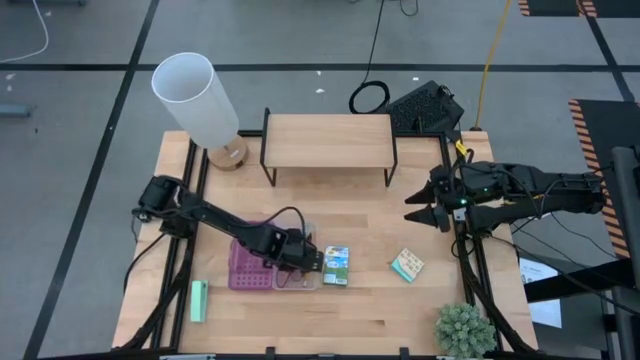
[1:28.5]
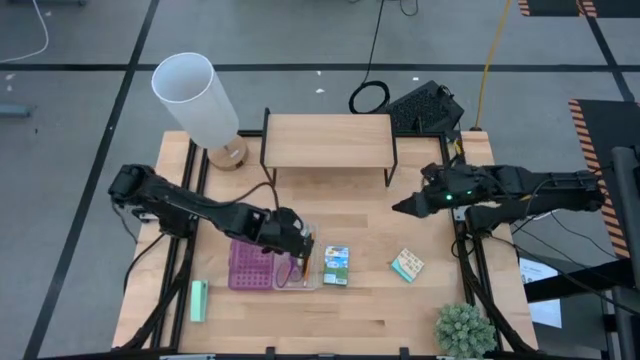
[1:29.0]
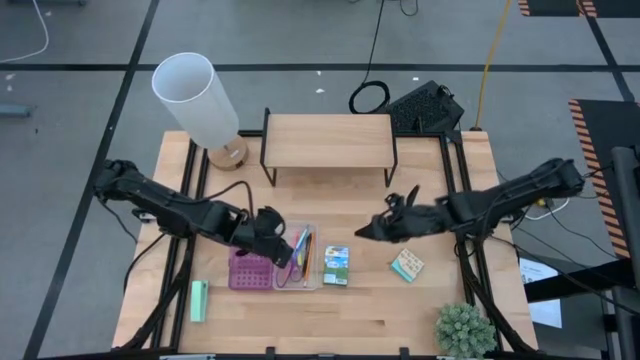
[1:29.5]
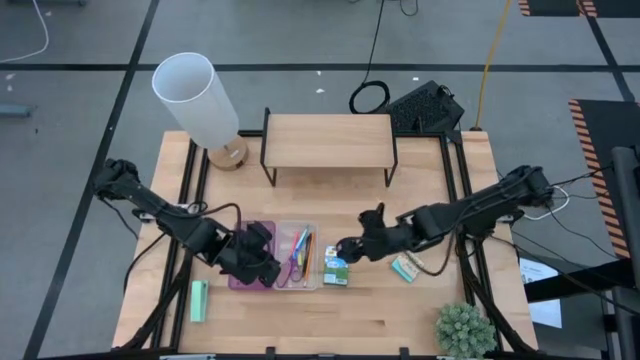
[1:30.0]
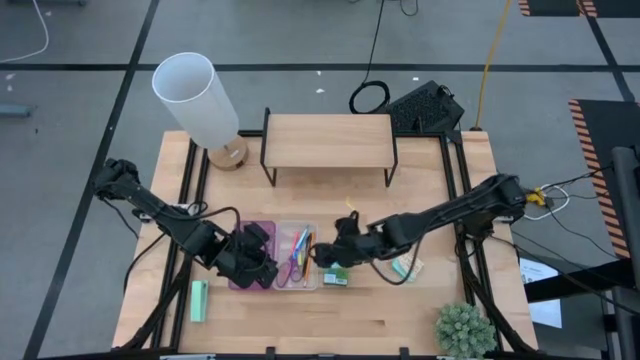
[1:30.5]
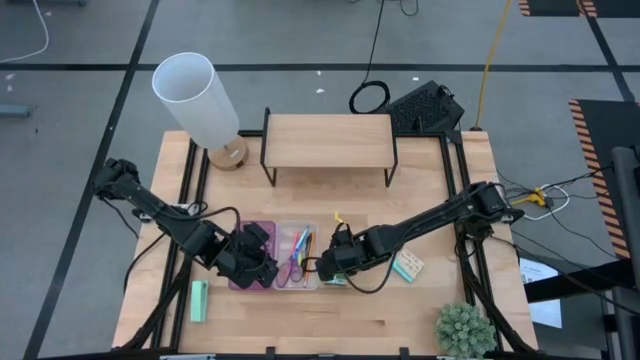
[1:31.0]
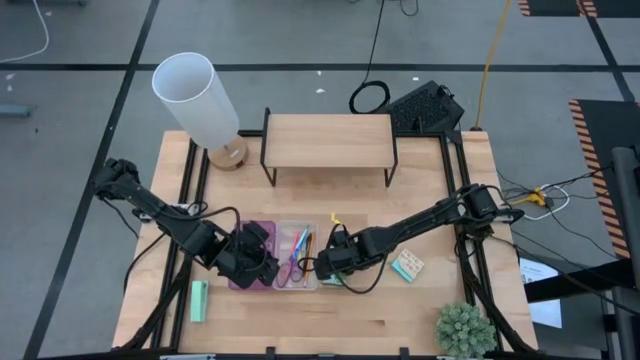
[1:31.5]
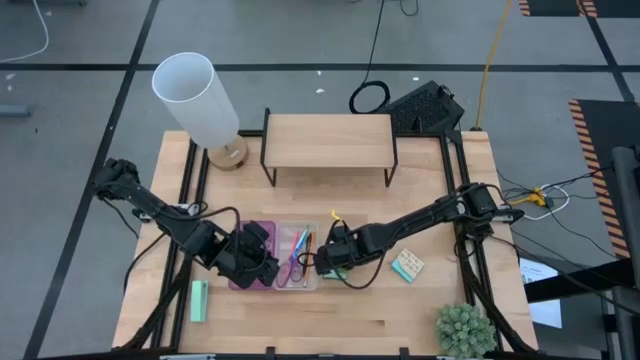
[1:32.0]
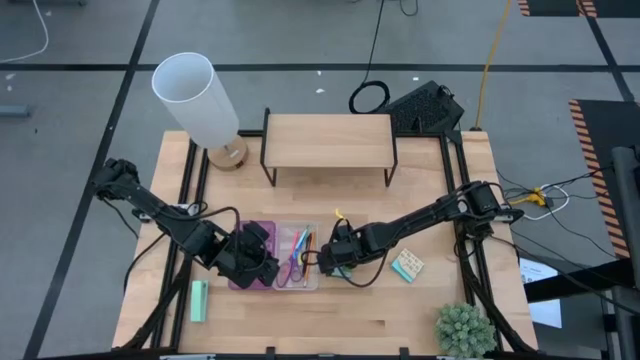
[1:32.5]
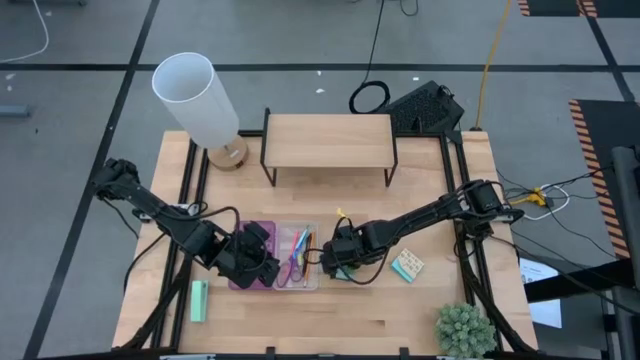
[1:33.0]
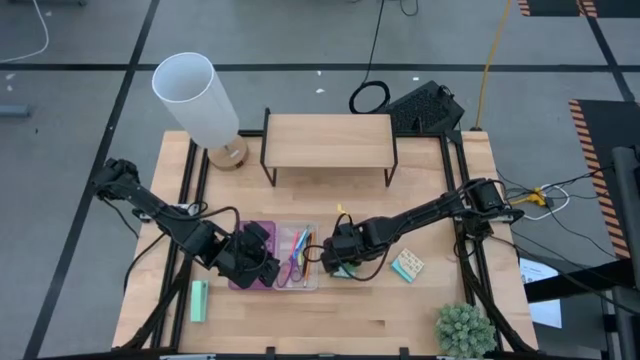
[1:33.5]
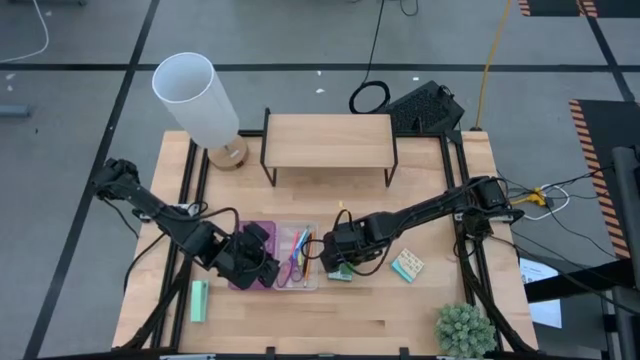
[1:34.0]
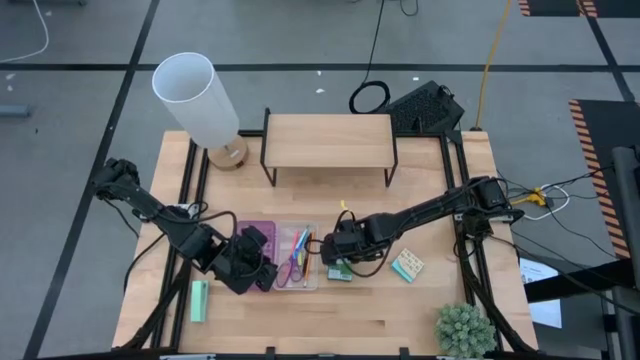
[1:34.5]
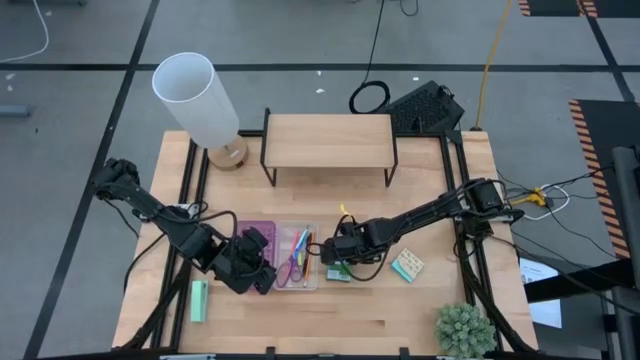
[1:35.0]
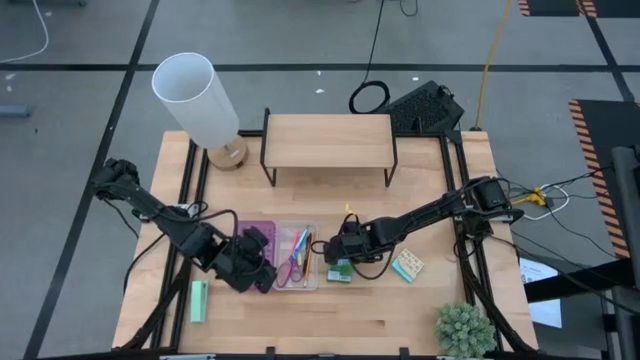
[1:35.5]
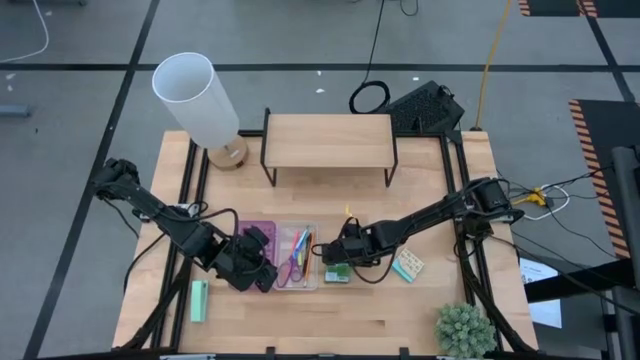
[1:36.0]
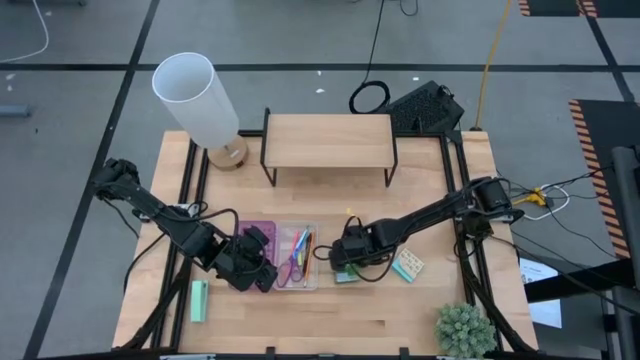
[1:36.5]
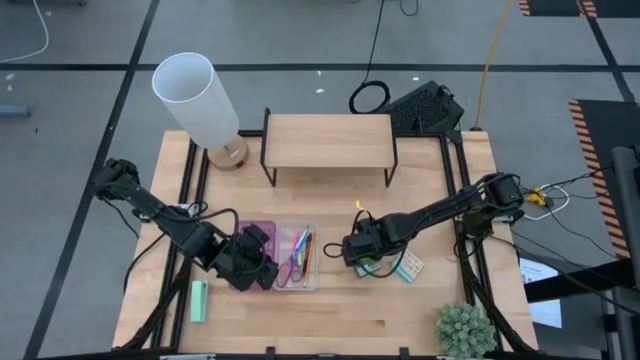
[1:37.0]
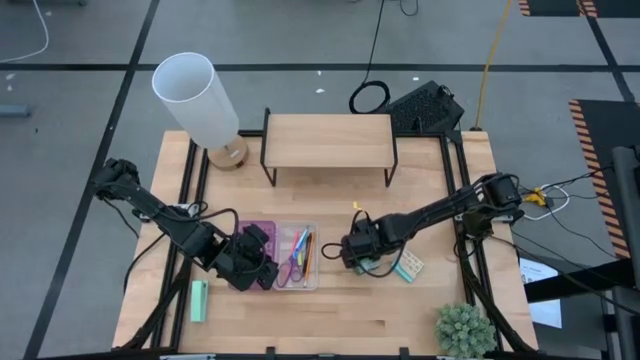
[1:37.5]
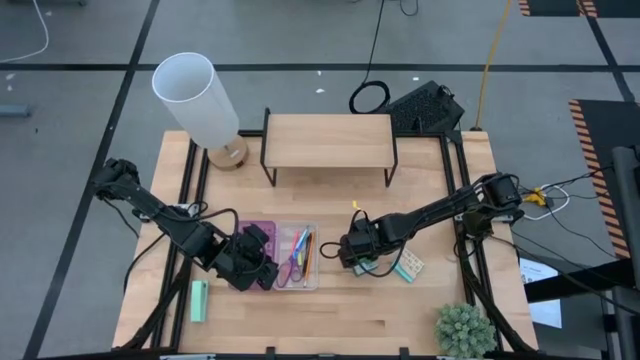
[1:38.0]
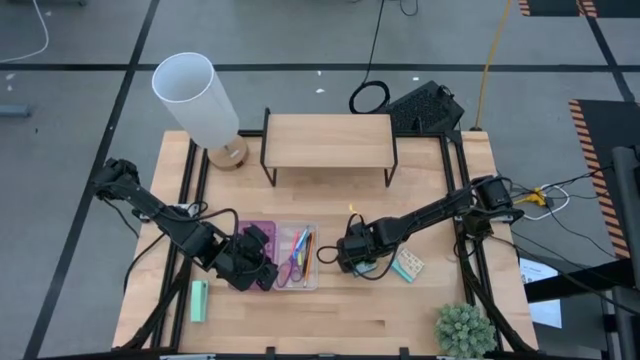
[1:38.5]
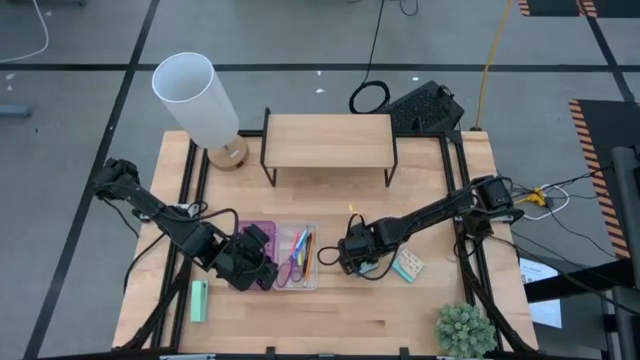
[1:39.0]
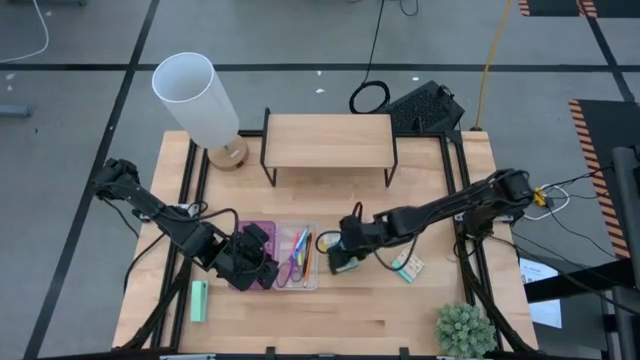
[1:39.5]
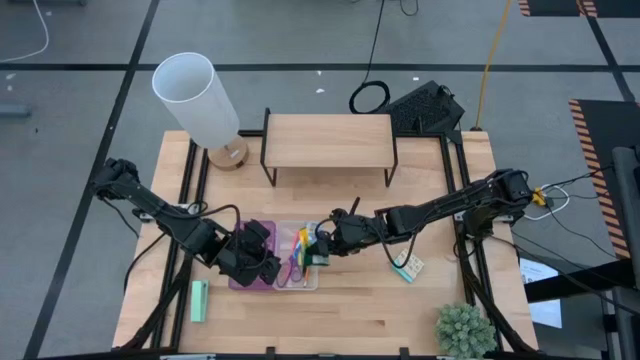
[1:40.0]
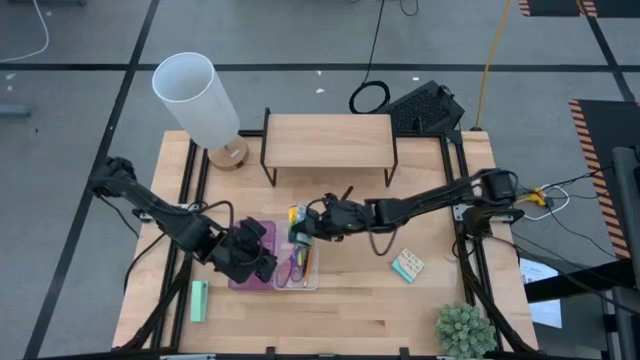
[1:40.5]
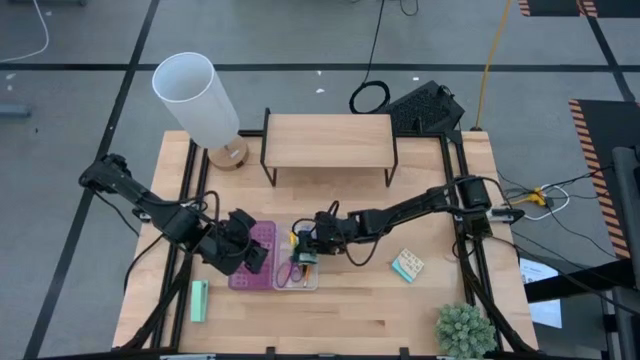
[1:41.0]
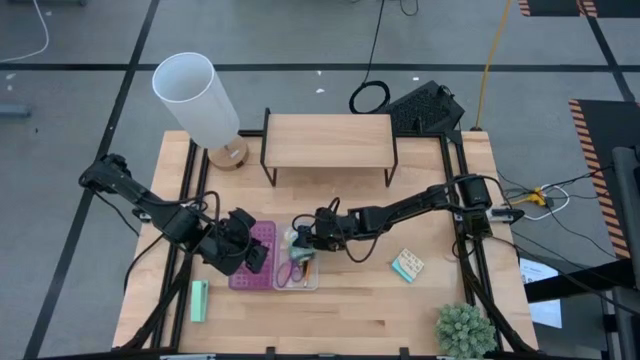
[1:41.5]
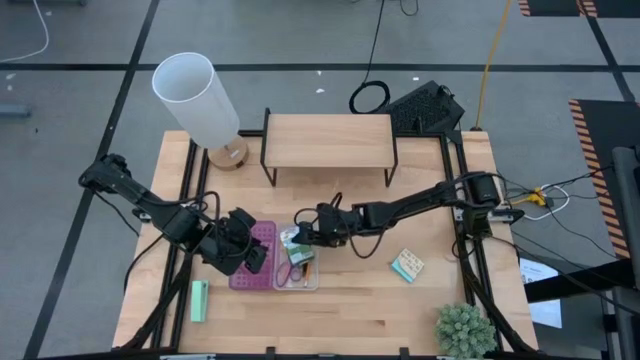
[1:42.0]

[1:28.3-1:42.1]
Task: Pack school essentials
Put the crayon box into the violet supply box

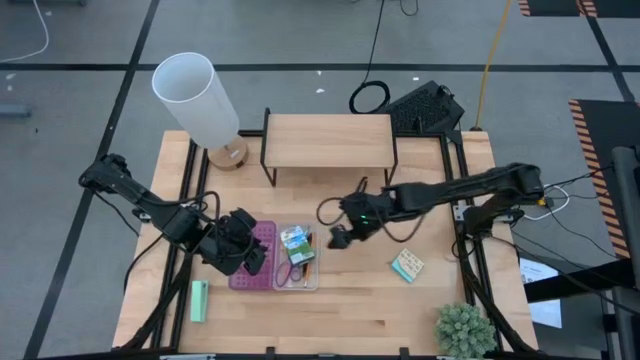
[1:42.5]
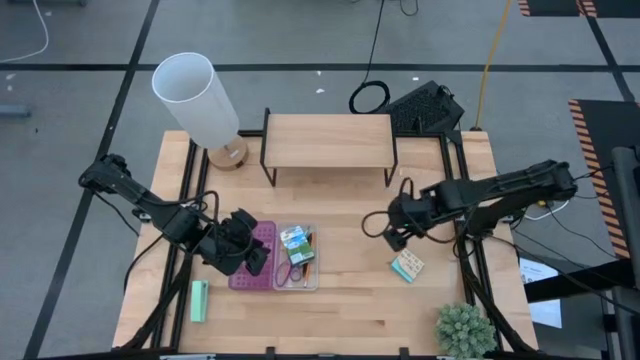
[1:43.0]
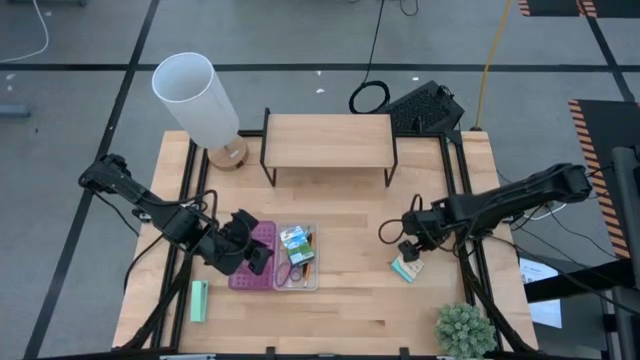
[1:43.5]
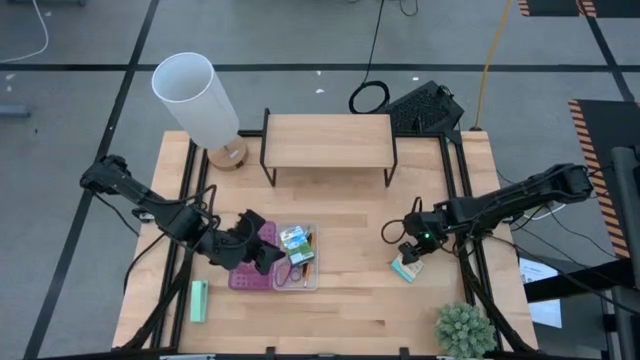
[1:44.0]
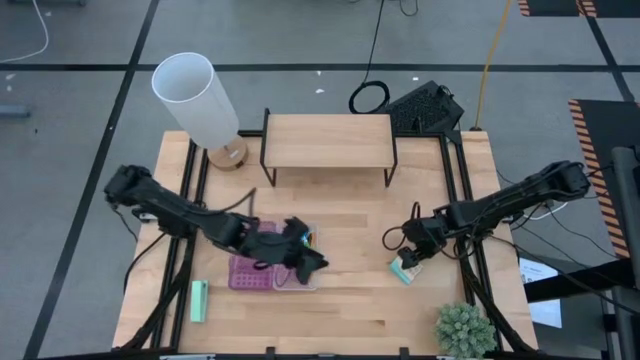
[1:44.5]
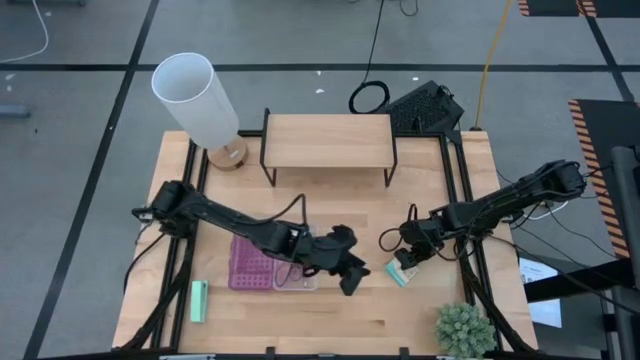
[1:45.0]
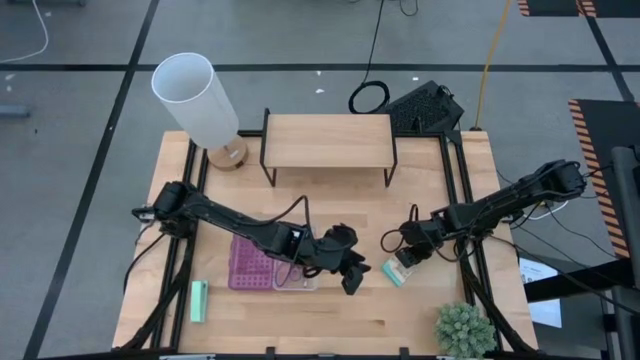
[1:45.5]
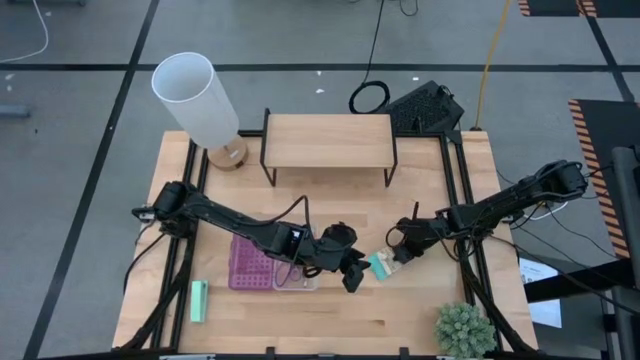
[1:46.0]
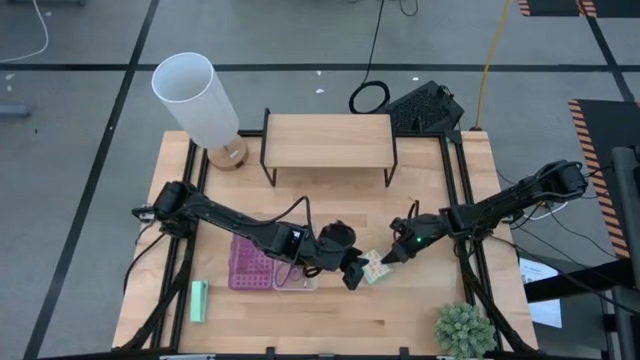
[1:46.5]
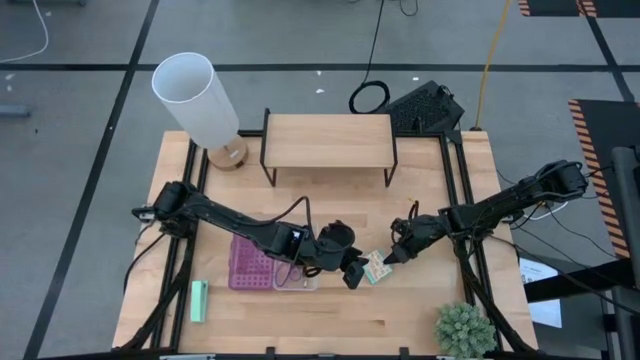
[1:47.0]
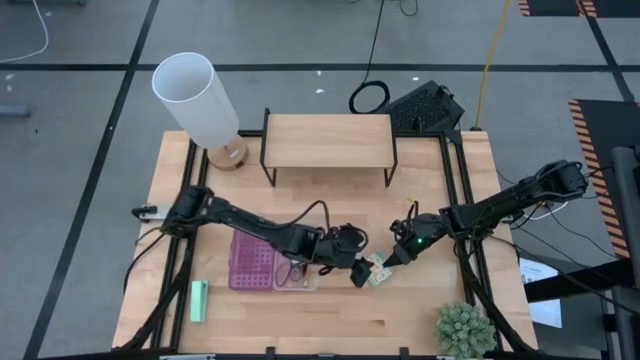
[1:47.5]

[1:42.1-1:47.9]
Put the light blue sticky notes into the violet supply box
